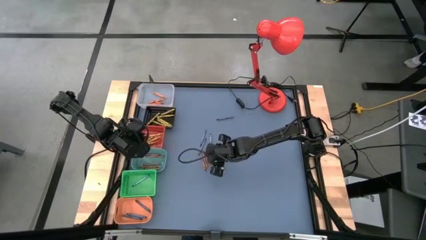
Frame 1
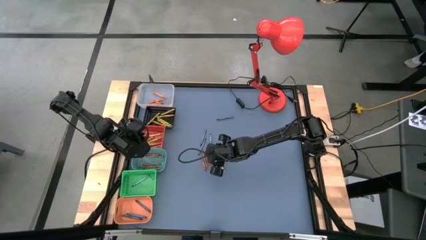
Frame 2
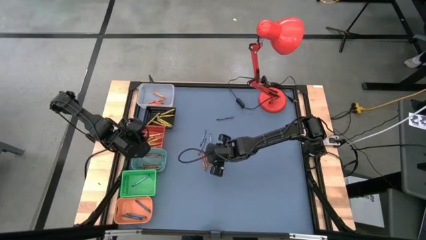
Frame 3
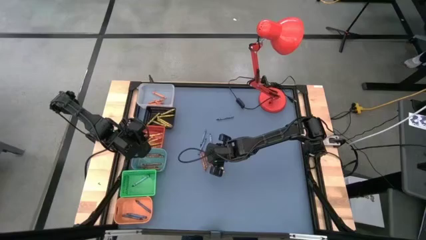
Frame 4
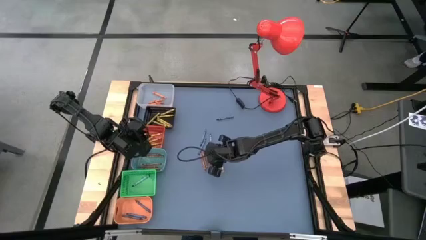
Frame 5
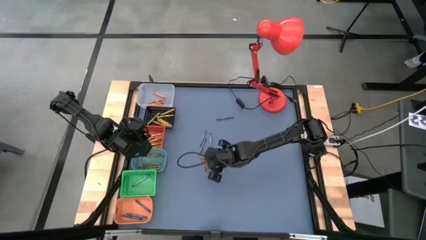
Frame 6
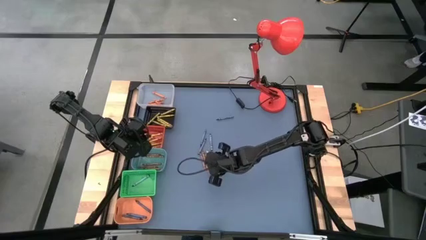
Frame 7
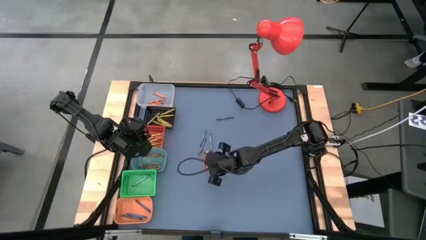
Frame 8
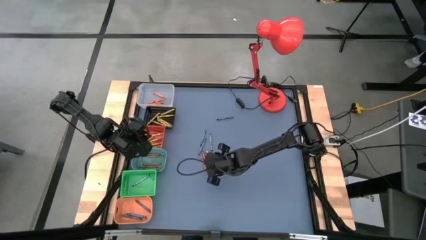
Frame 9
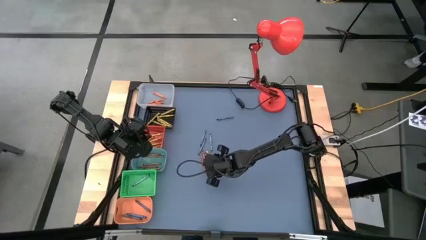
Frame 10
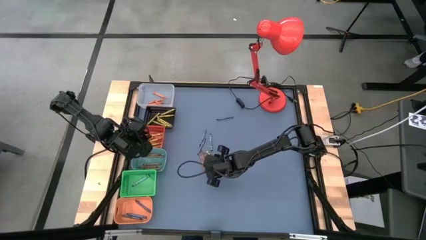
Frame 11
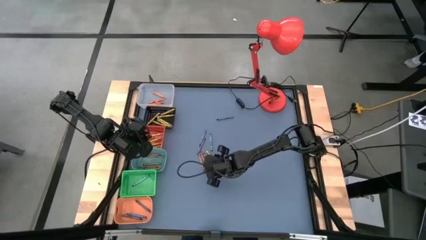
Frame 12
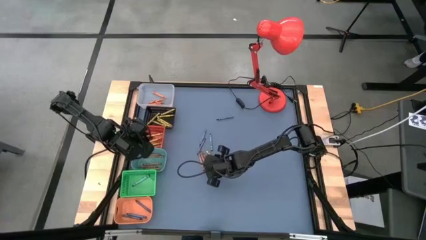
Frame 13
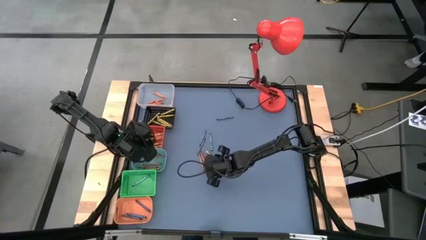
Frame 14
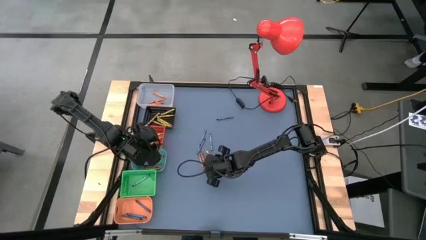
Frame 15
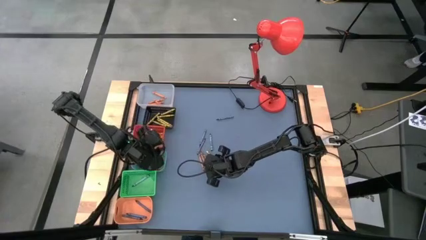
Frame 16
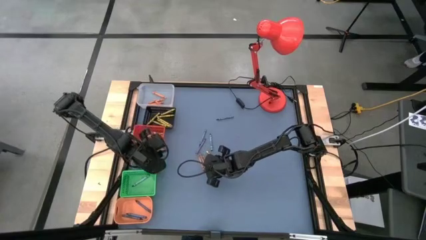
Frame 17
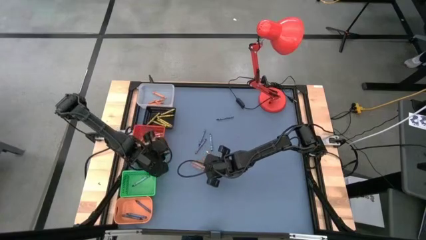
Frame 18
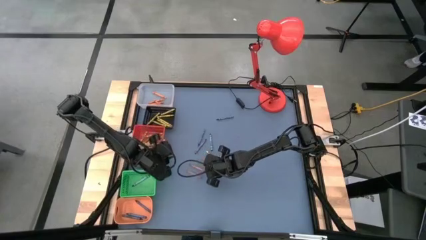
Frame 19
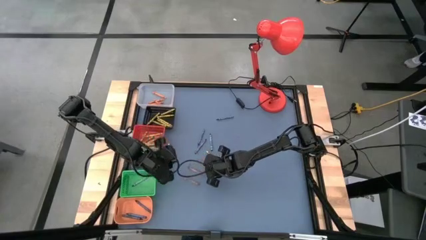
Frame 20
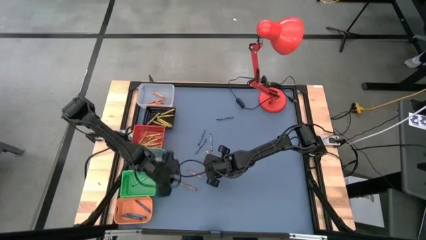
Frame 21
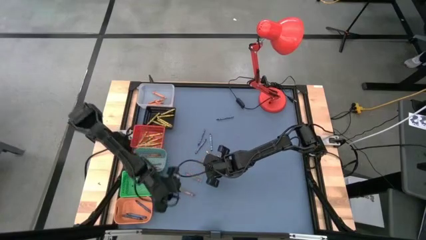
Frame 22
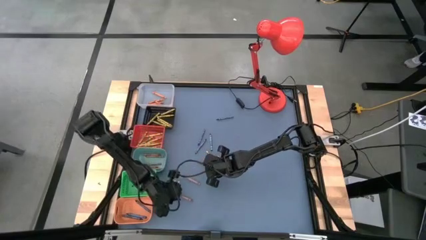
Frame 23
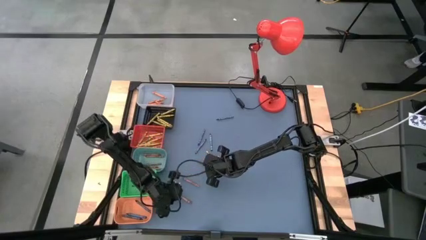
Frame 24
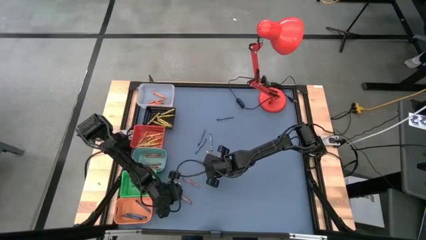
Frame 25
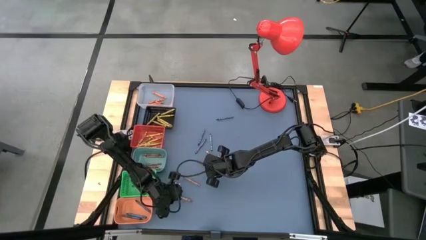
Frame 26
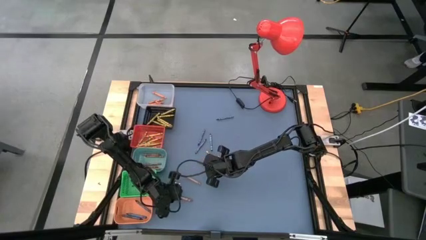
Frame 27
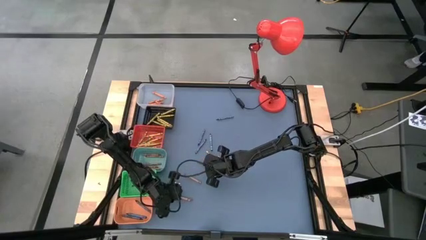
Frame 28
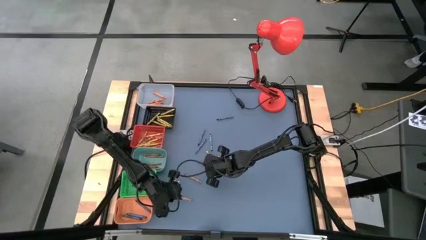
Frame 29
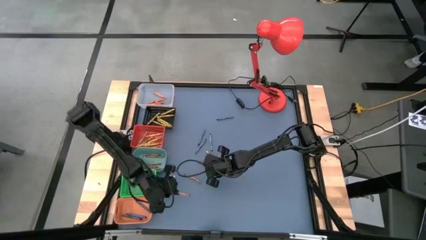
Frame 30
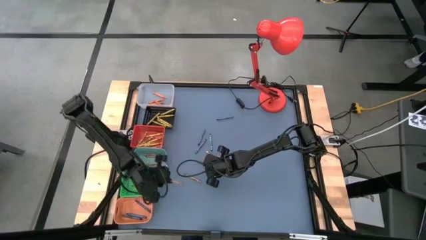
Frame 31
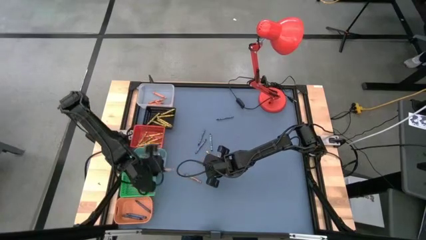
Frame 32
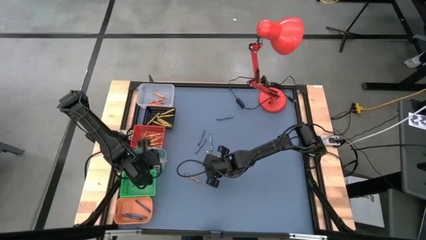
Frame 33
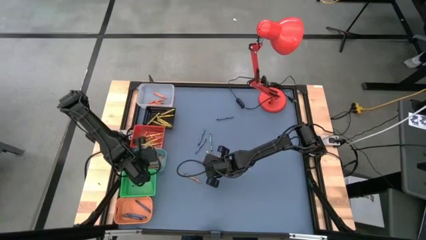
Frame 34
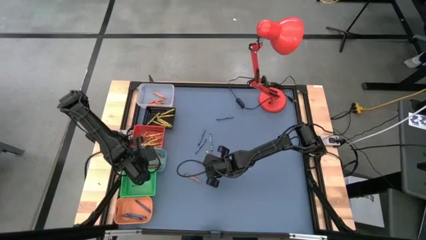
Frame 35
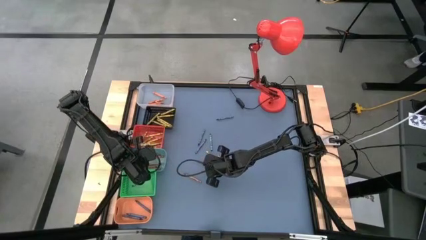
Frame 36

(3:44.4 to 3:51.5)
Task: Sort crayons
Put the brown crayon into the blue bin

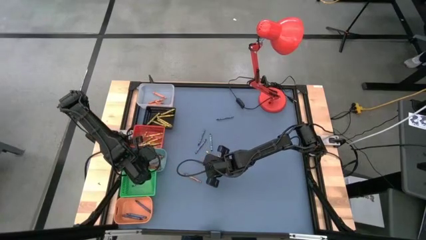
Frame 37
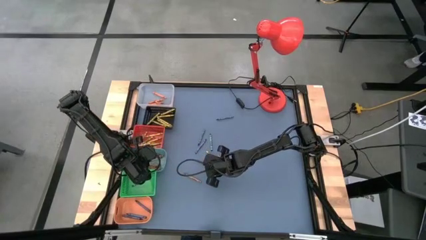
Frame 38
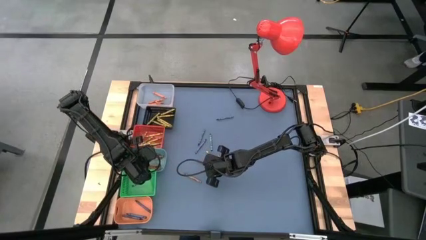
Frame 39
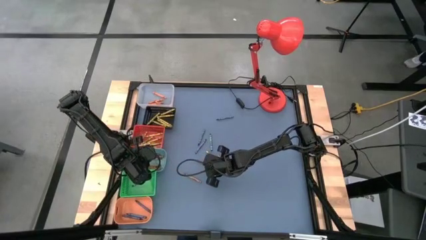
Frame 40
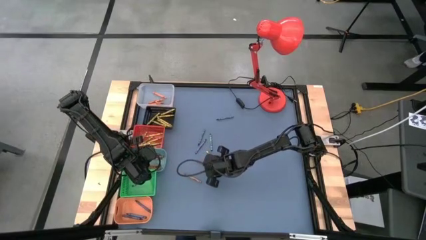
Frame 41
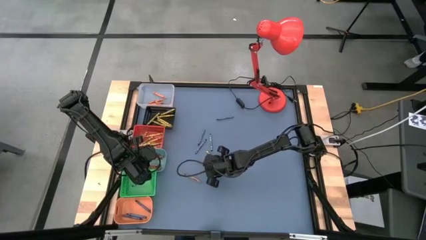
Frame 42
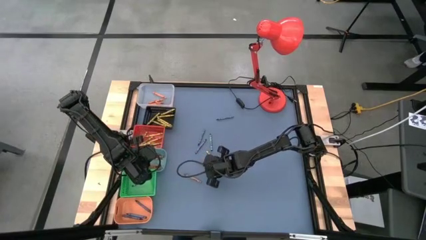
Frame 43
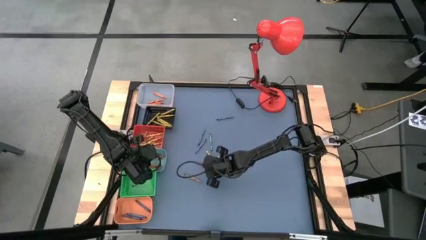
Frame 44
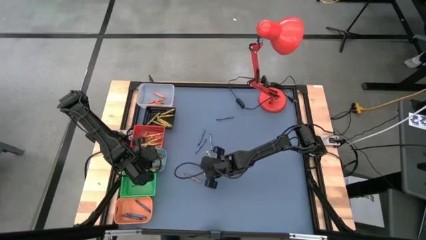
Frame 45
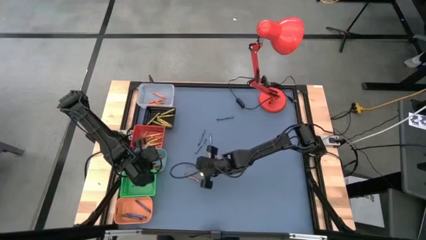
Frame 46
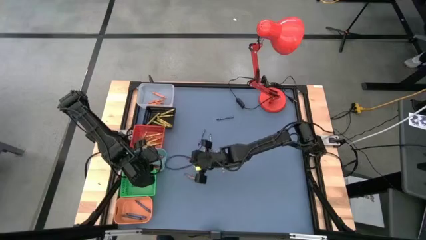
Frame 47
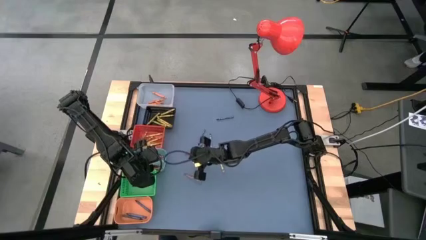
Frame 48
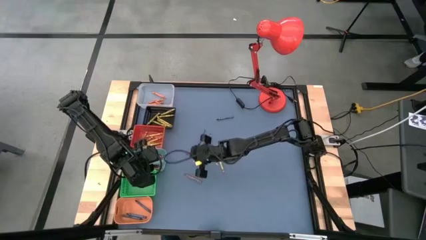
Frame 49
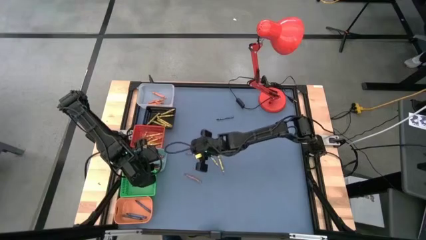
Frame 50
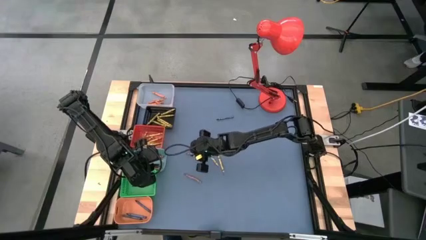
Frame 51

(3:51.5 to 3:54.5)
Put the brown crayon into the blue bin

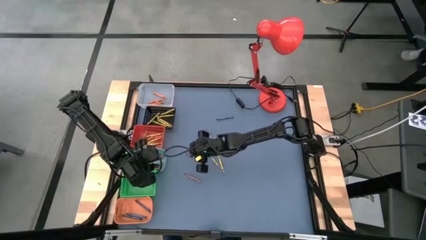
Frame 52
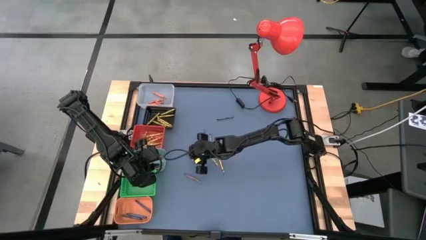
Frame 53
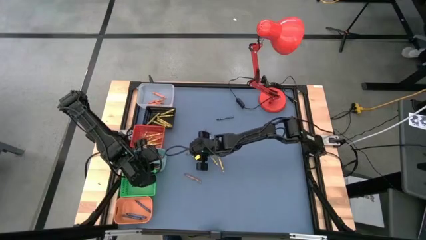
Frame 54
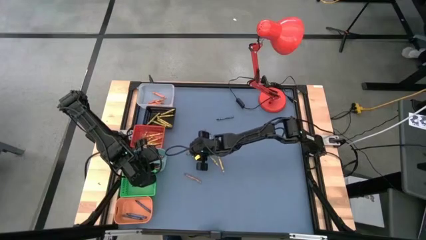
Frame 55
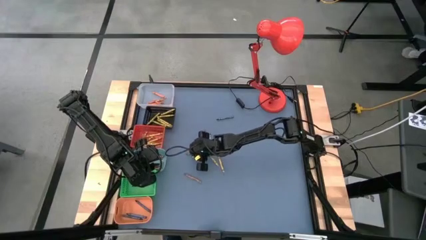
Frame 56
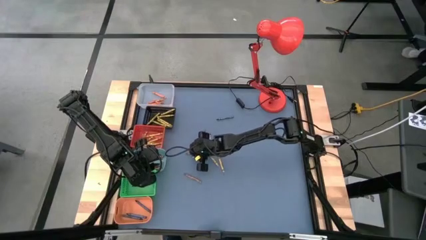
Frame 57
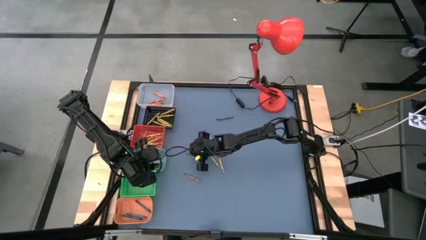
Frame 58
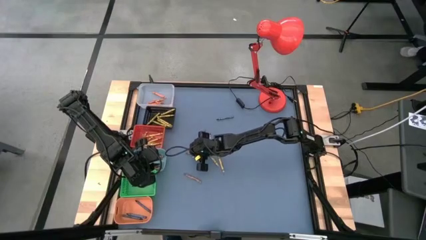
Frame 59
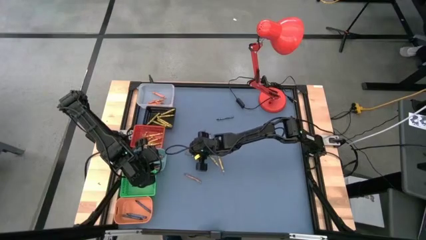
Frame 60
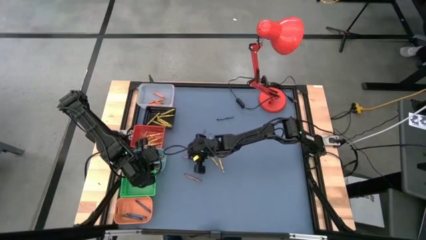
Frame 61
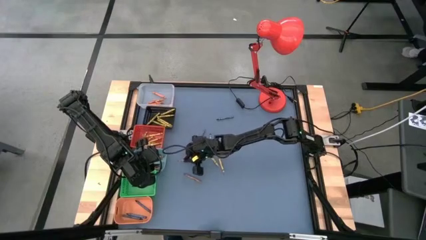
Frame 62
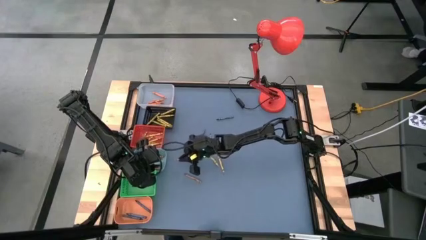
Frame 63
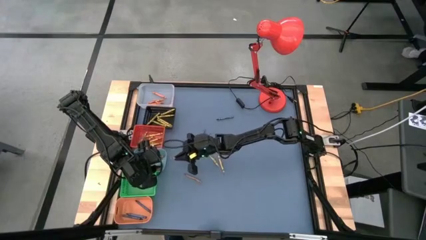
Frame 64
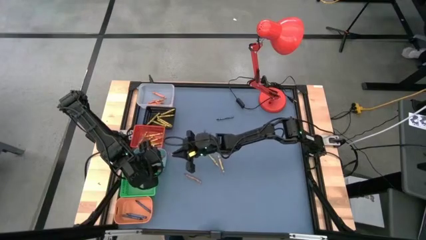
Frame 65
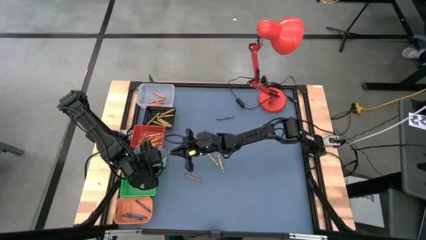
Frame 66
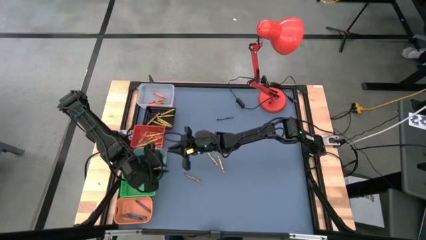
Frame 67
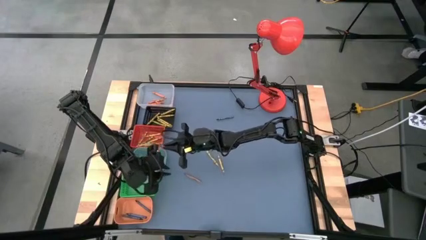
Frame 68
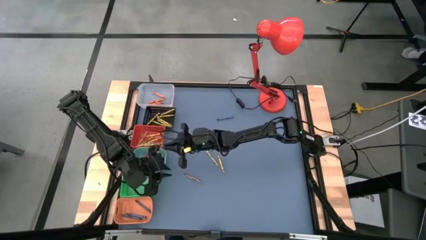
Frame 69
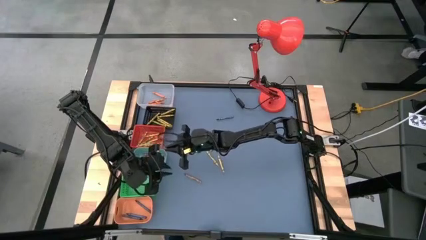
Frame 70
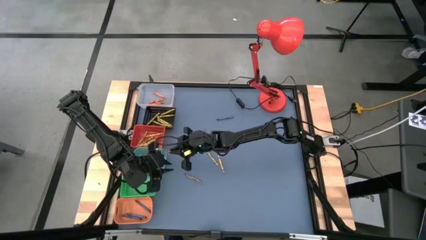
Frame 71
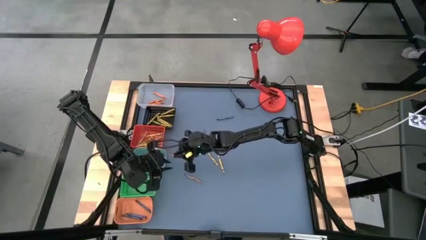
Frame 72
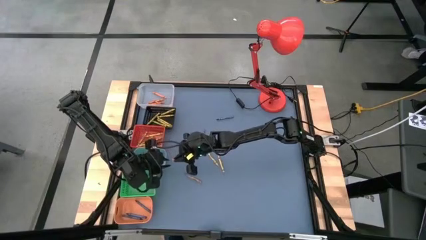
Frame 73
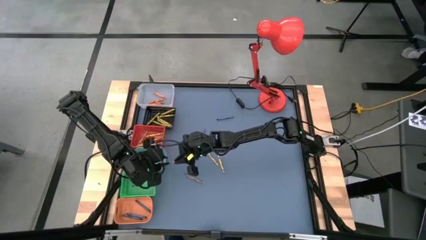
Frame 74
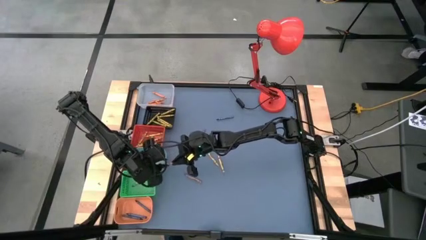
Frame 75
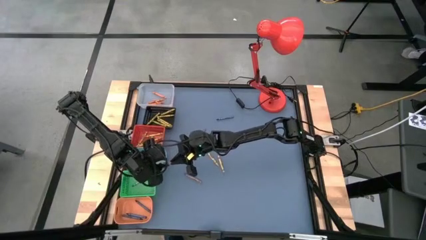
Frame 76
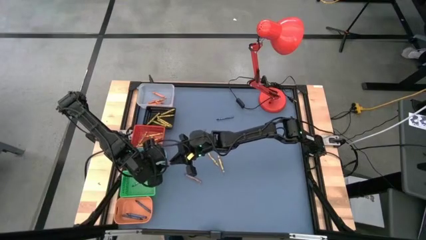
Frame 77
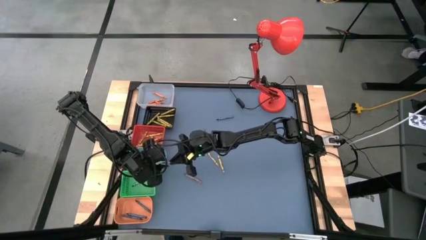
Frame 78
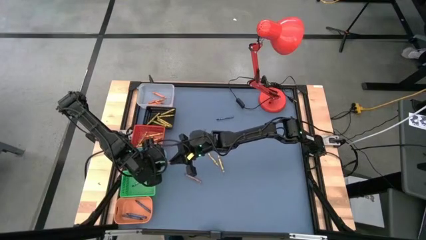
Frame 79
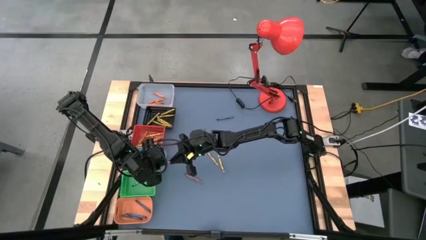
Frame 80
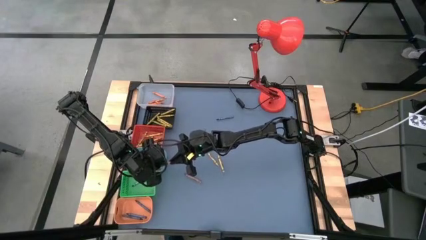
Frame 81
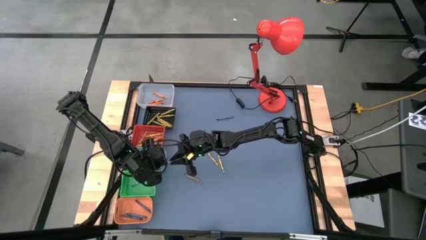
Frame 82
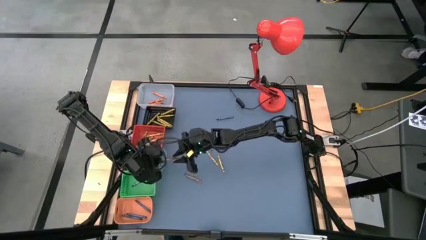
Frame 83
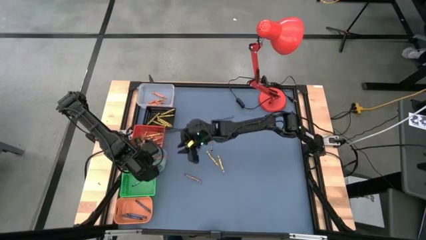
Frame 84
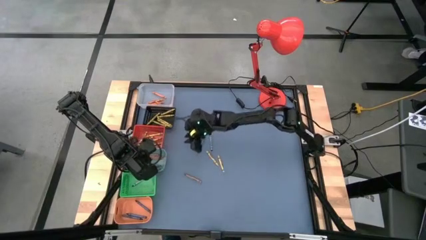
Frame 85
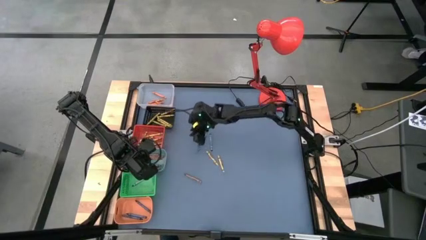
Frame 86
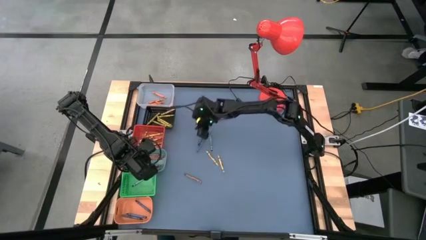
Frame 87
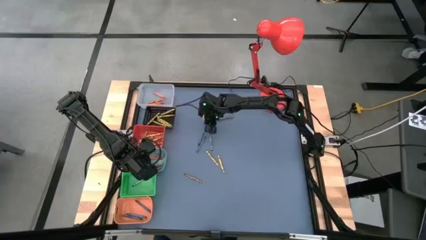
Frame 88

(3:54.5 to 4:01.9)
Put the brown crayon into the blue bin
